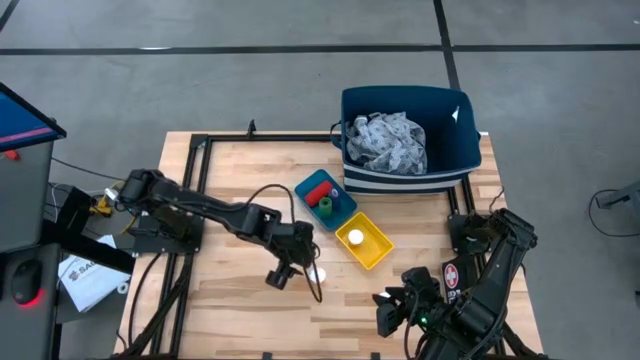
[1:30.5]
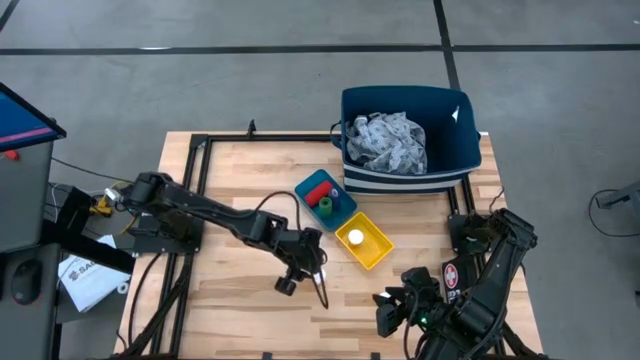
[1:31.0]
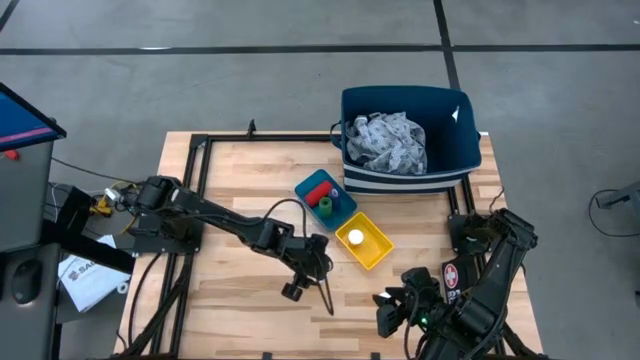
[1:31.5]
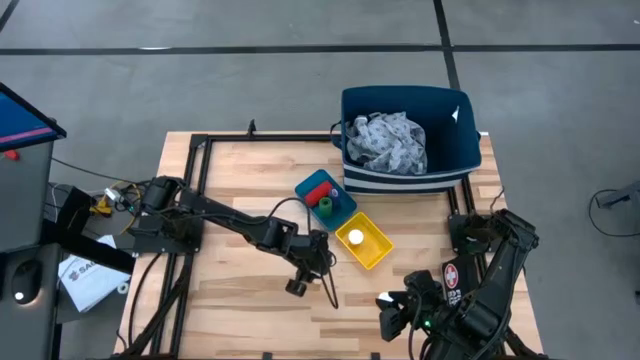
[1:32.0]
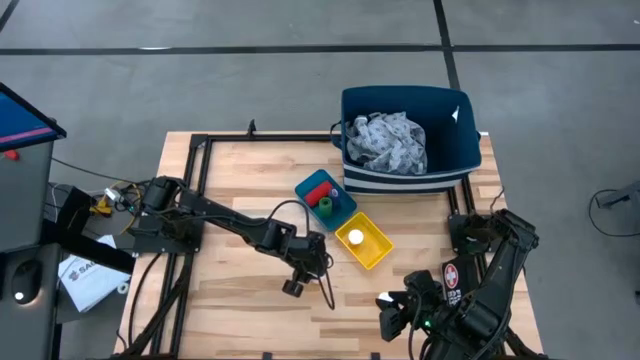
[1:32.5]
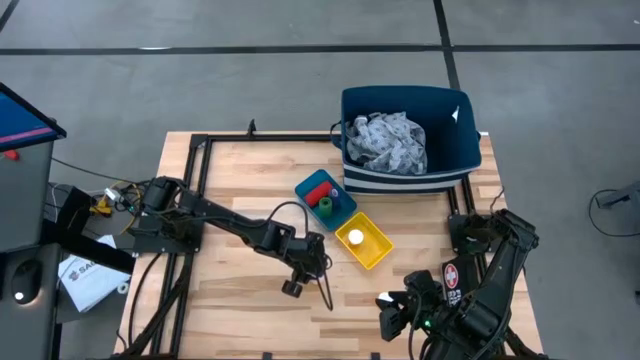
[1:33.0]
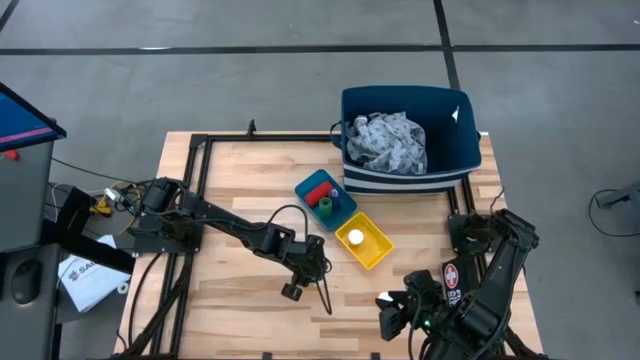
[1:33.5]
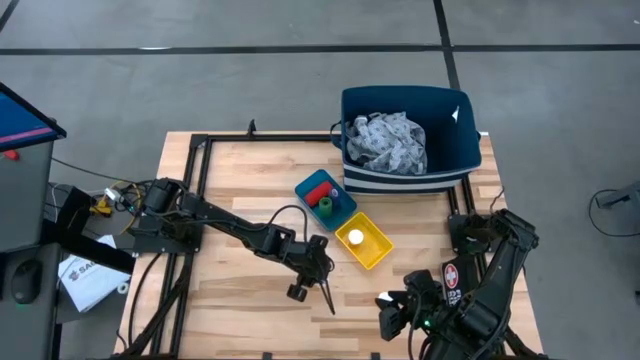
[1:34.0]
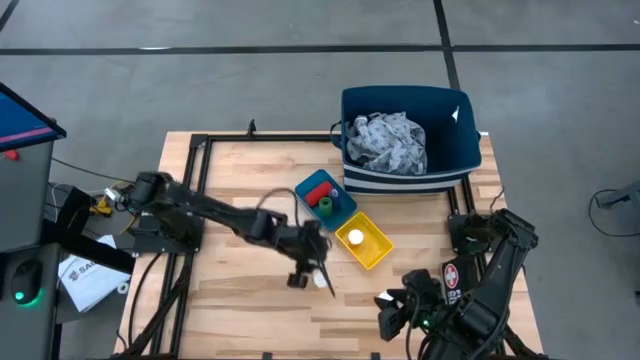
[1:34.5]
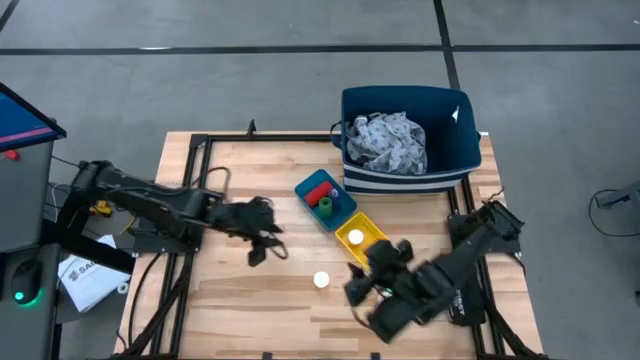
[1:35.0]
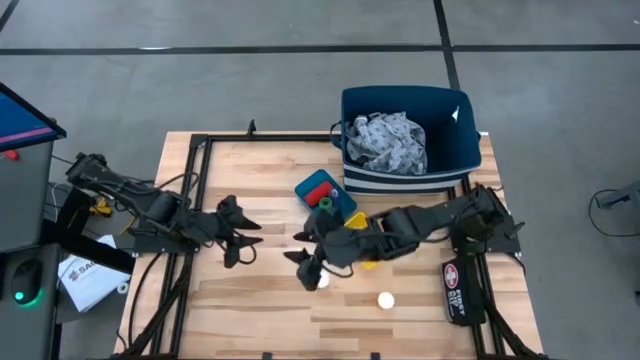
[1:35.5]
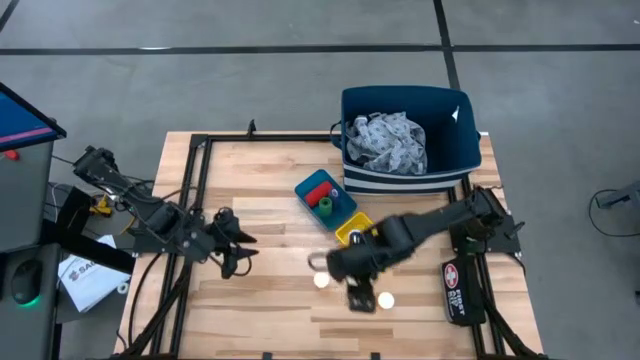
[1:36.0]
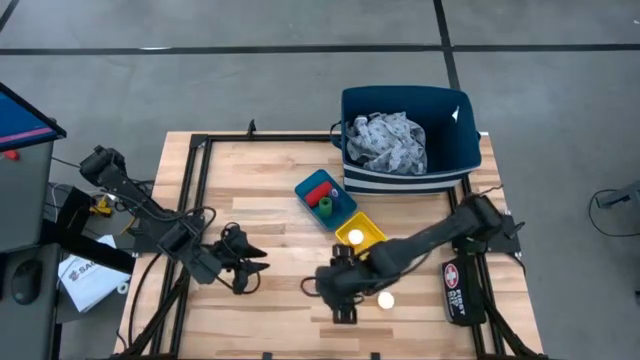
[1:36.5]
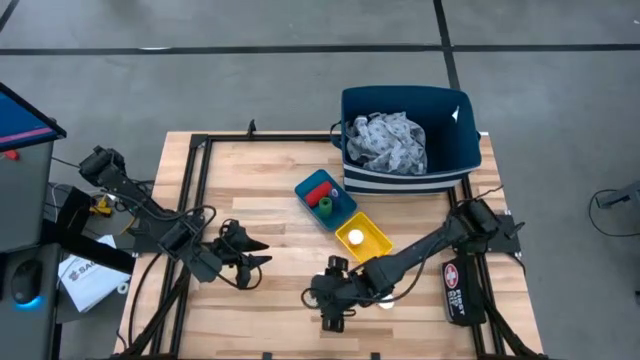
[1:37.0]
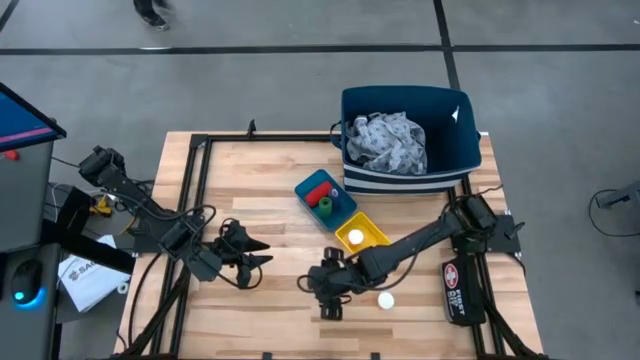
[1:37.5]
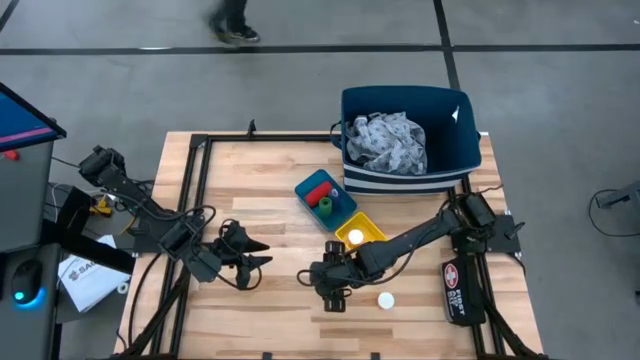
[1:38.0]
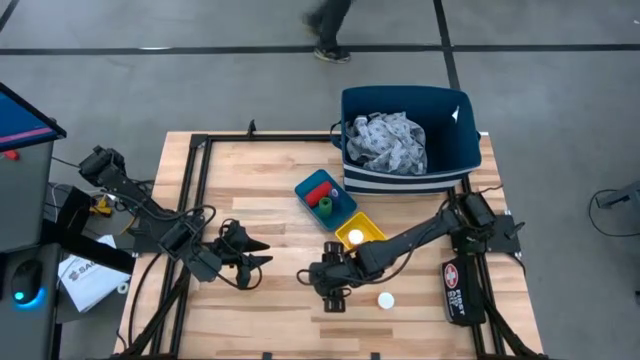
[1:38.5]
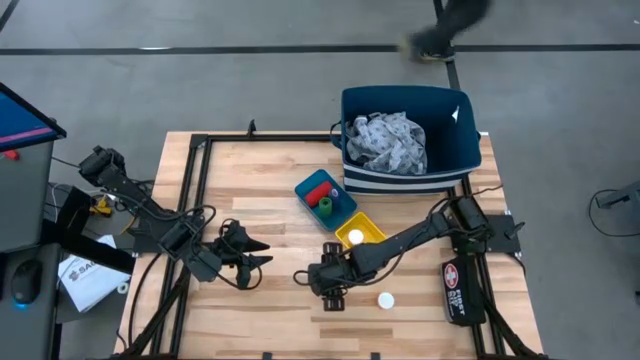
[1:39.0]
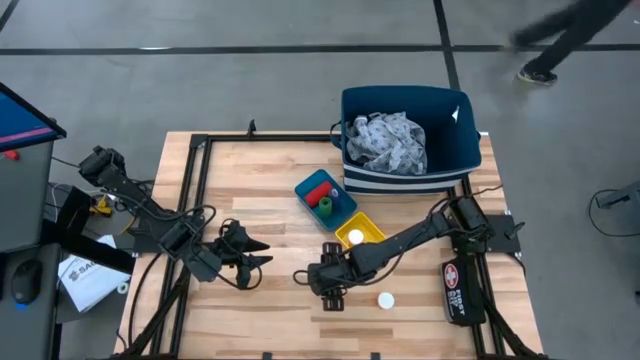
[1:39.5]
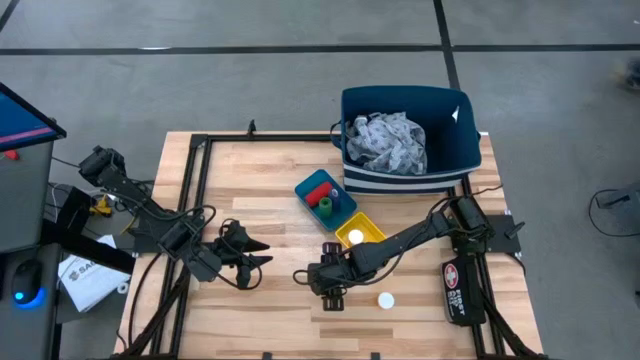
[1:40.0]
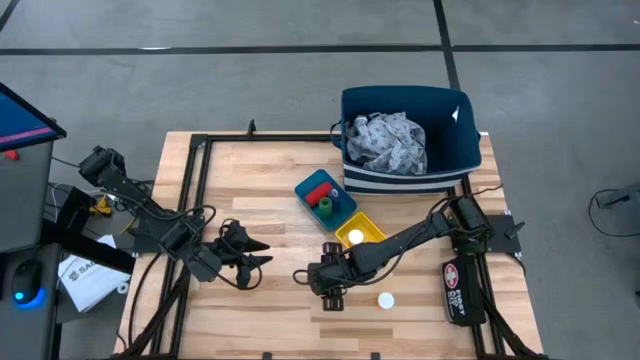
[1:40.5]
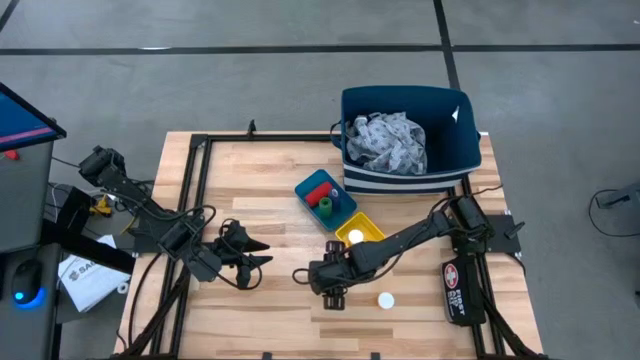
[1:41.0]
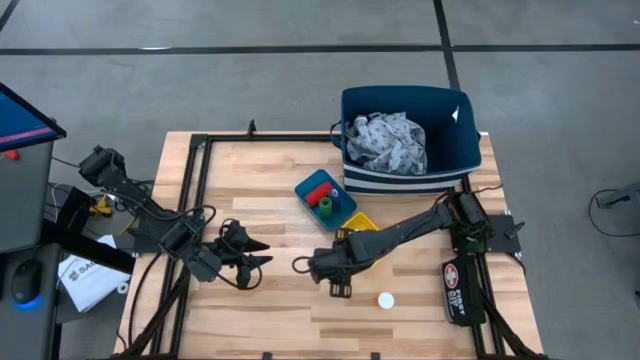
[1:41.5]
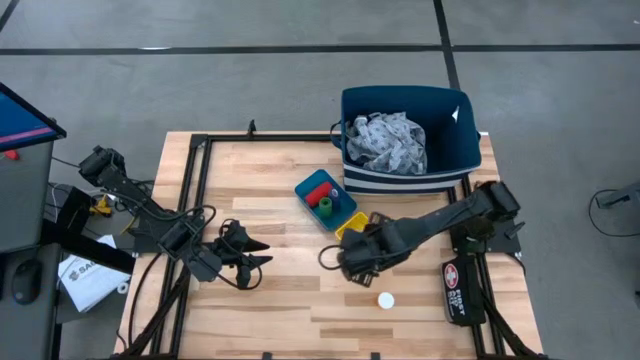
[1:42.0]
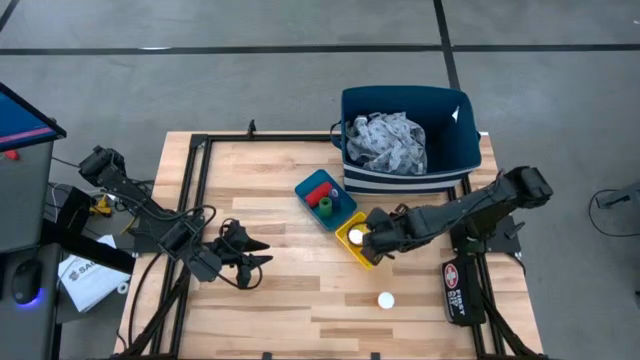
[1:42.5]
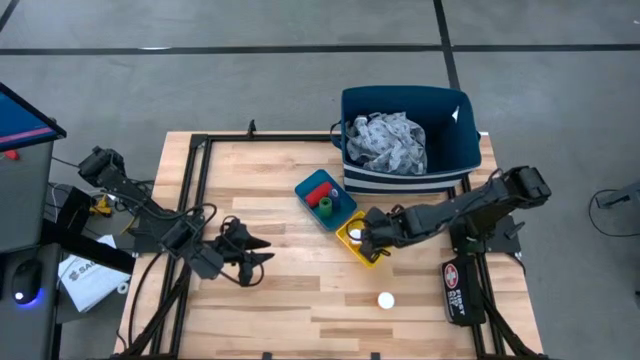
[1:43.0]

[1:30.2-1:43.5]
Task: Pick & Place Medicine items
Put the top orange pill bottle into the yellow bin

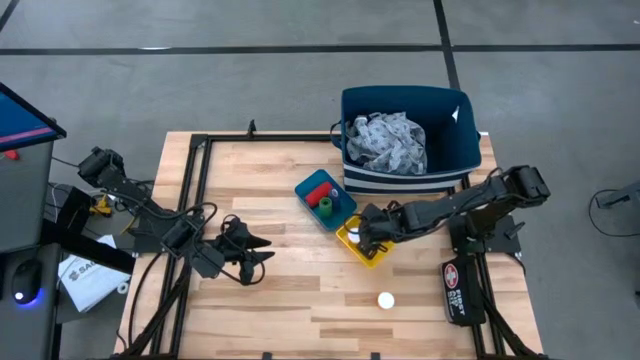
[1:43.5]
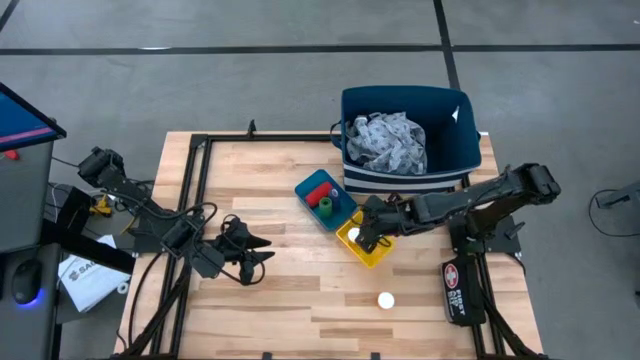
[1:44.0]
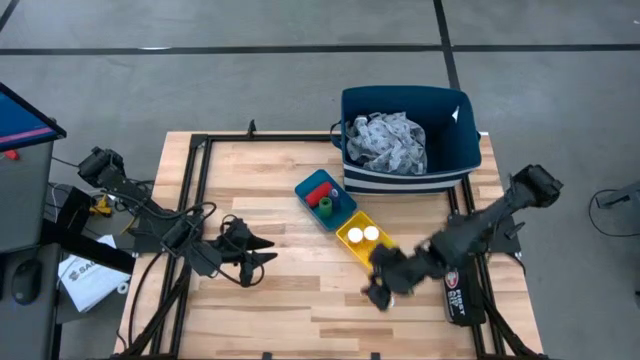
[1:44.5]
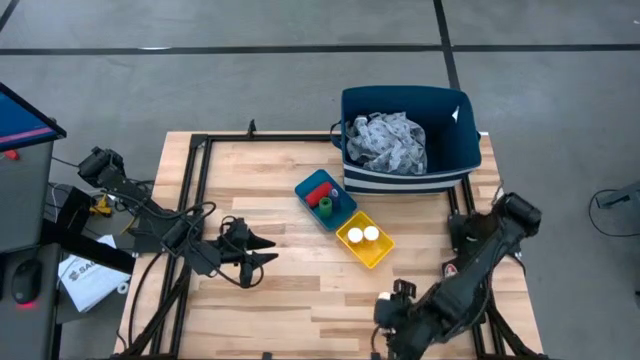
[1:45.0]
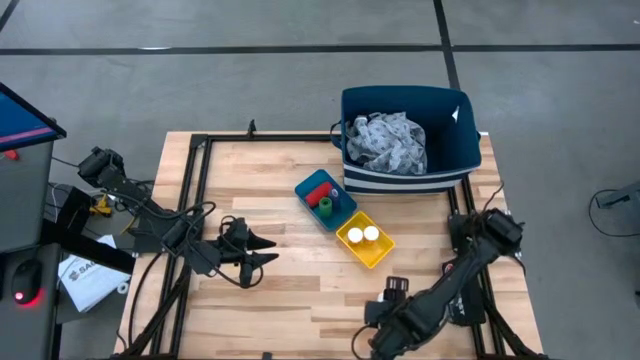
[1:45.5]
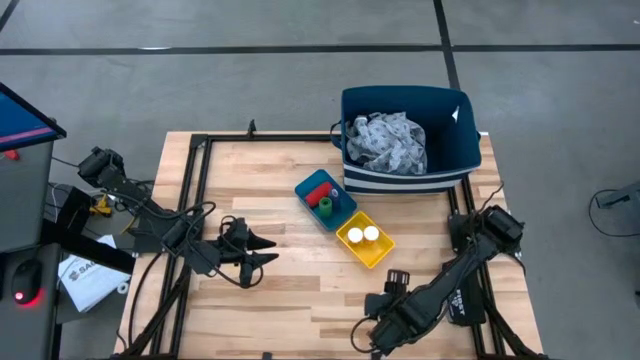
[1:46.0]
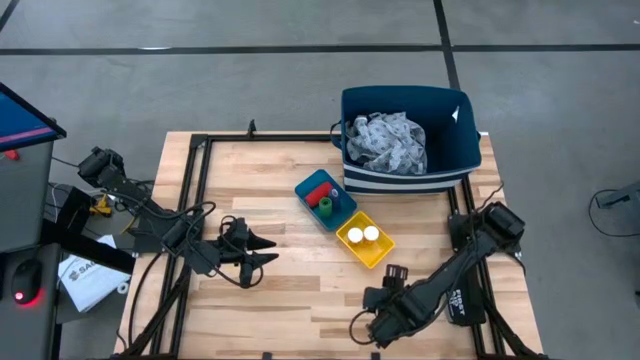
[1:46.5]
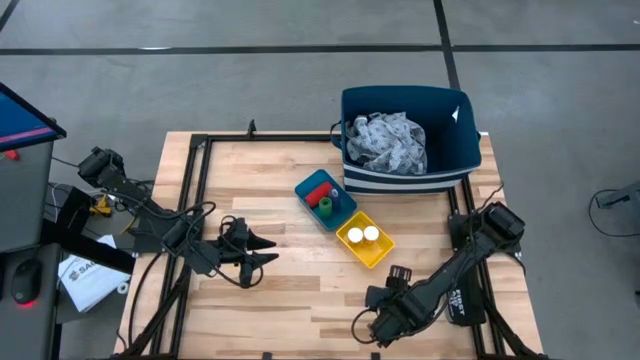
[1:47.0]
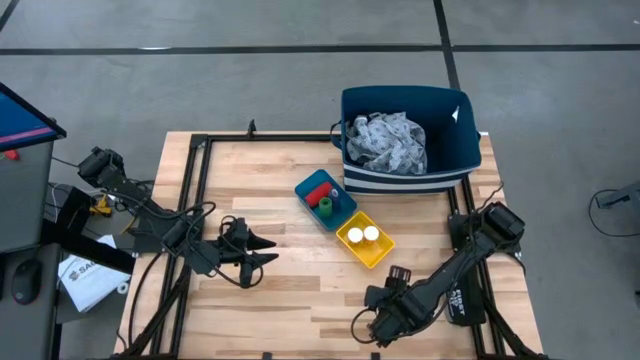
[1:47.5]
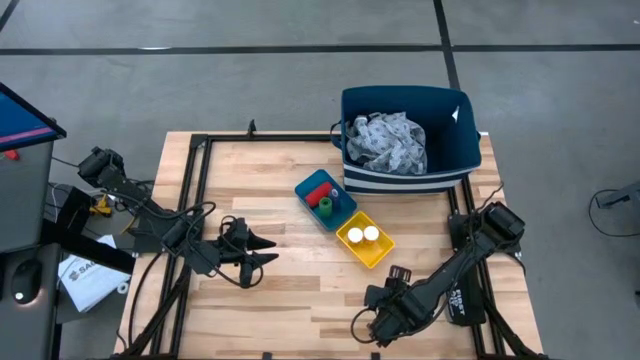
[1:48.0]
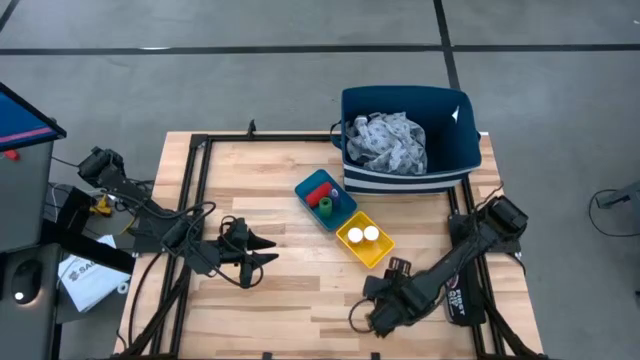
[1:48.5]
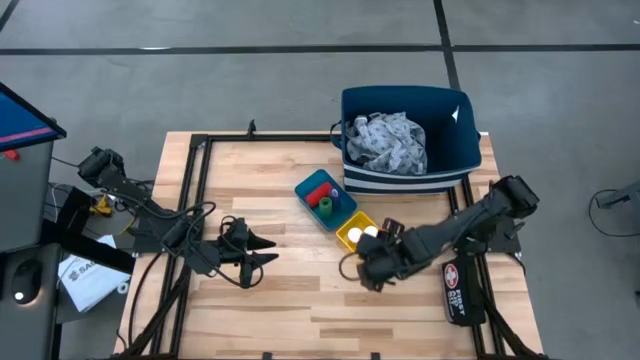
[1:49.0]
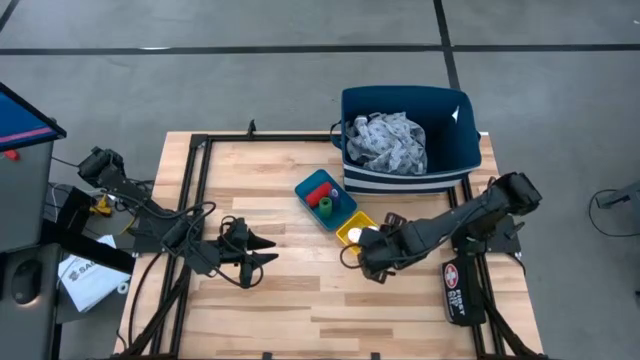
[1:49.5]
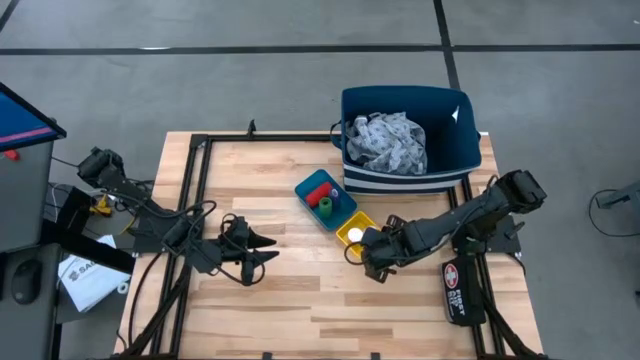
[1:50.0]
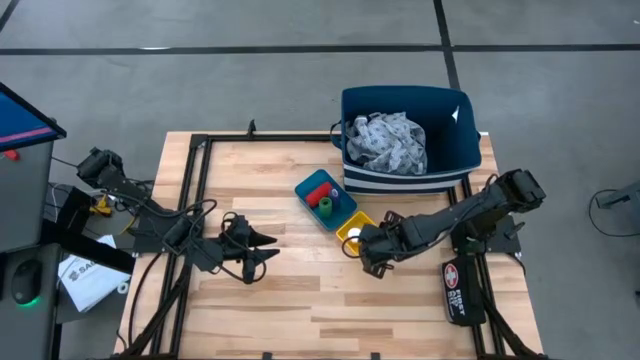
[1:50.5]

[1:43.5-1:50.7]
Put the orange pill bottle into the yellow bin

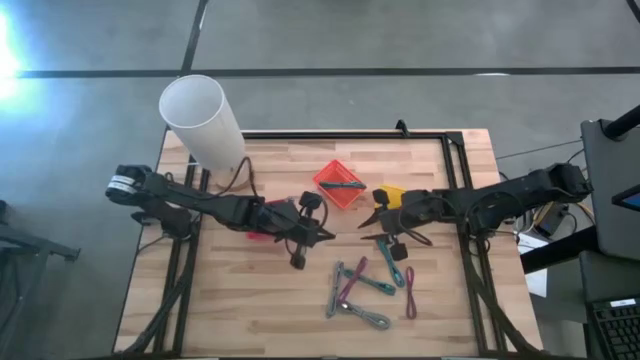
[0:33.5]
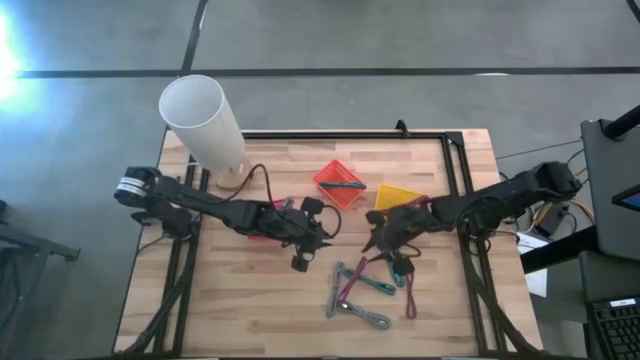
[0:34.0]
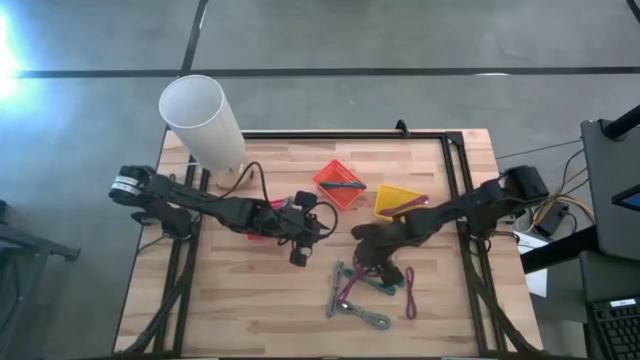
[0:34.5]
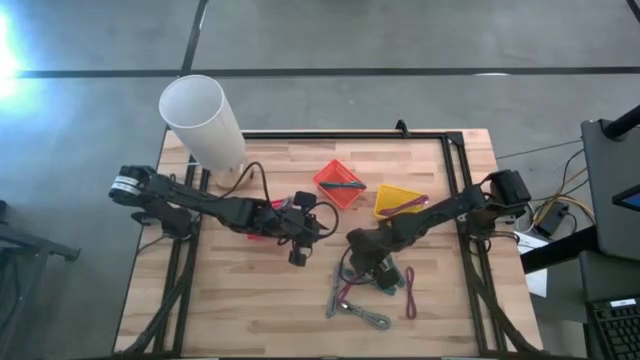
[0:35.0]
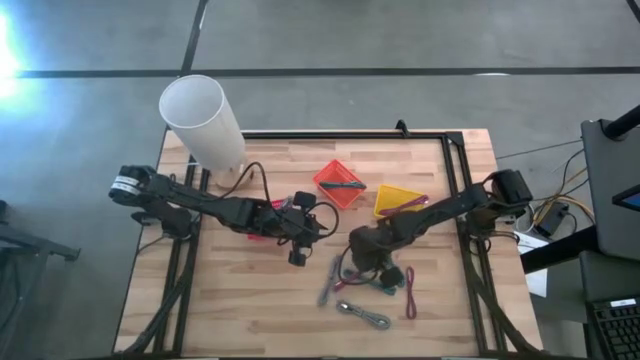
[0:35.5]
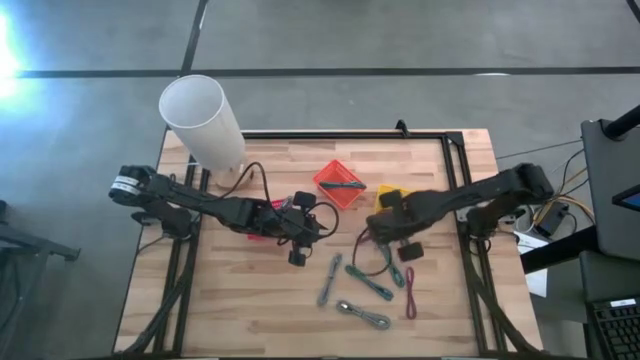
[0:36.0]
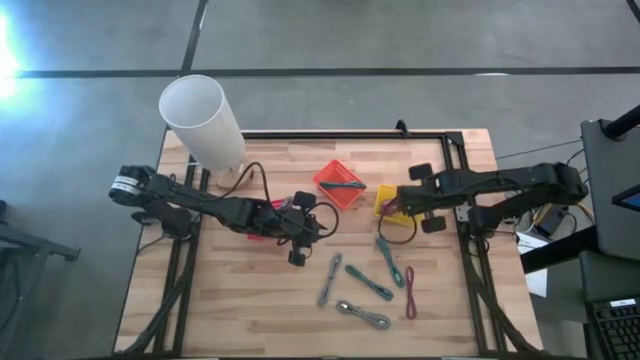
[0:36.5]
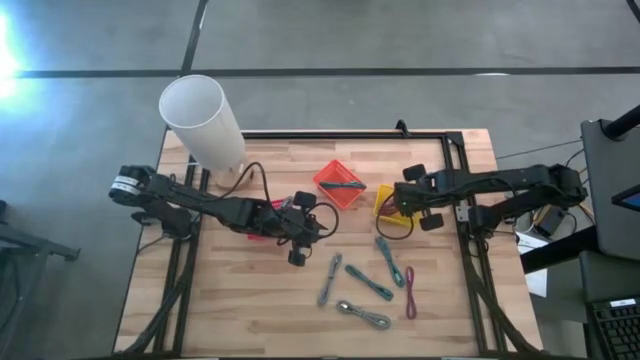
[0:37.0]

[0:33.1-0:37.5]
Task: Pick & Place USB Port
Put the top black and pink charger cable into the yellow bin
